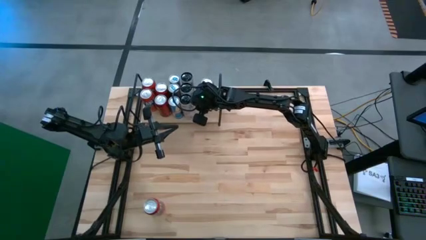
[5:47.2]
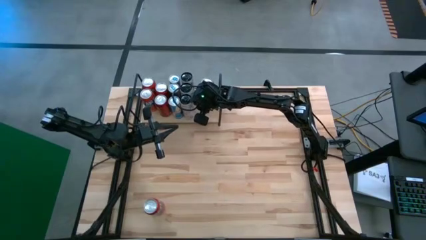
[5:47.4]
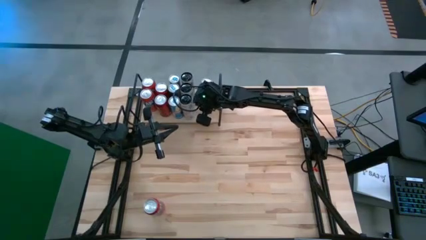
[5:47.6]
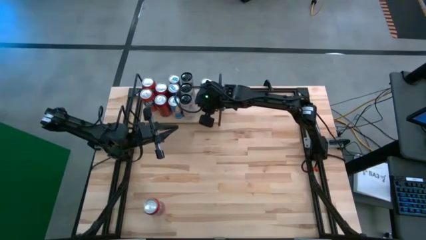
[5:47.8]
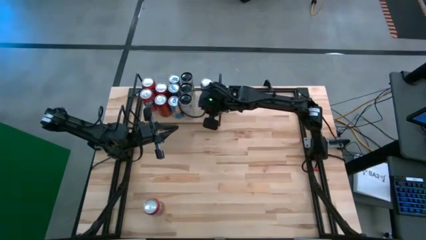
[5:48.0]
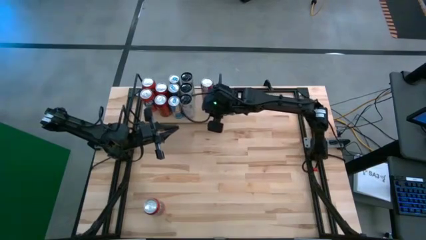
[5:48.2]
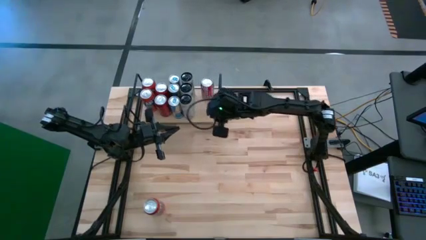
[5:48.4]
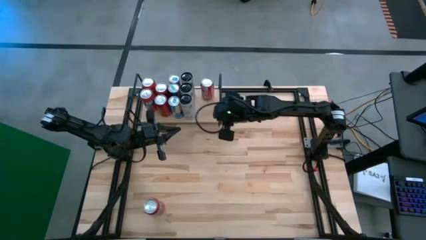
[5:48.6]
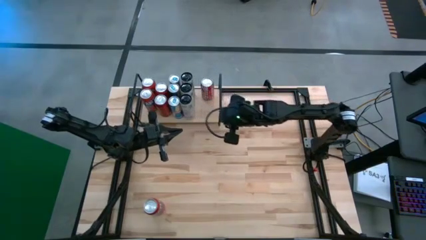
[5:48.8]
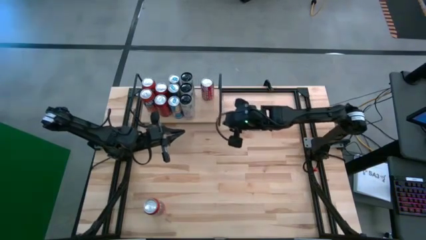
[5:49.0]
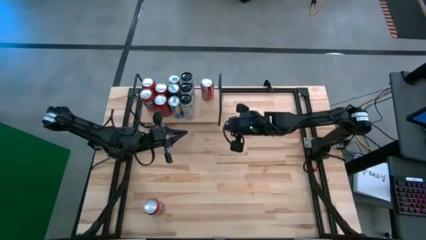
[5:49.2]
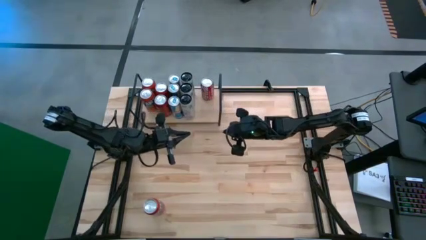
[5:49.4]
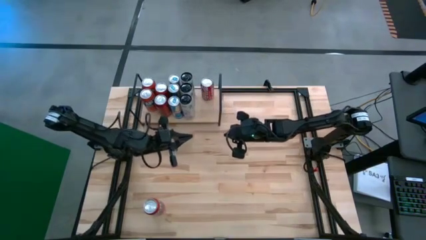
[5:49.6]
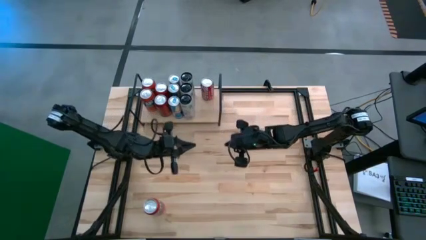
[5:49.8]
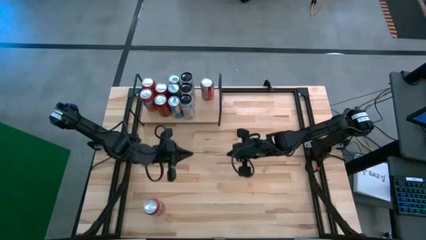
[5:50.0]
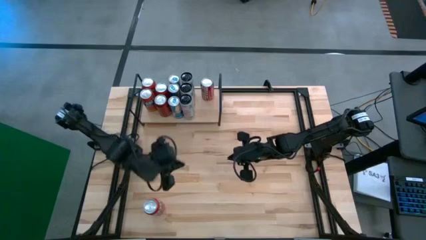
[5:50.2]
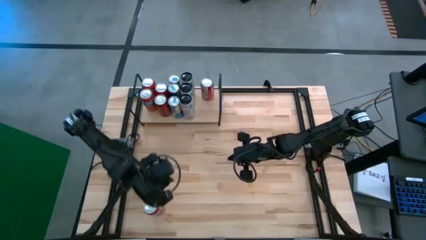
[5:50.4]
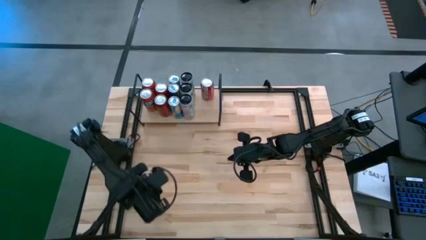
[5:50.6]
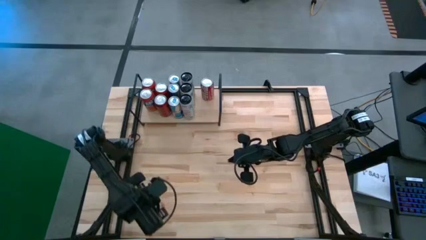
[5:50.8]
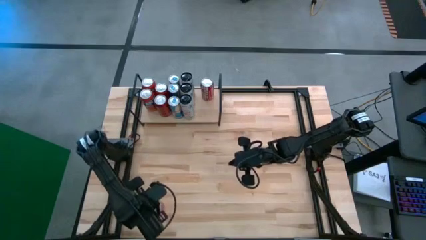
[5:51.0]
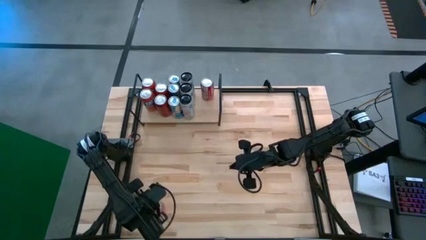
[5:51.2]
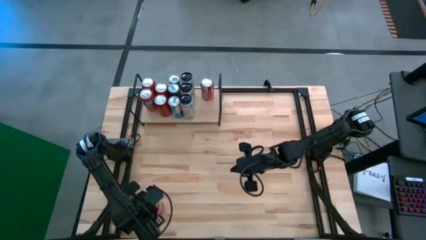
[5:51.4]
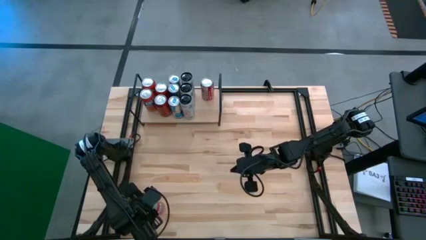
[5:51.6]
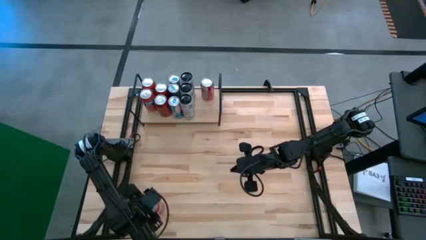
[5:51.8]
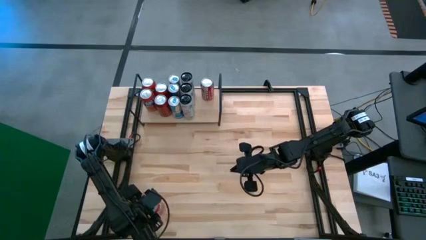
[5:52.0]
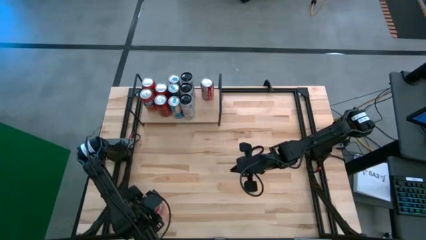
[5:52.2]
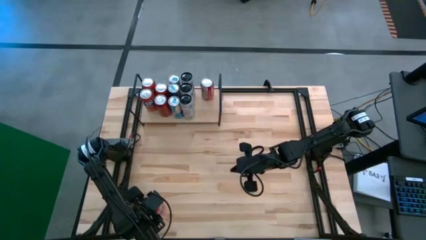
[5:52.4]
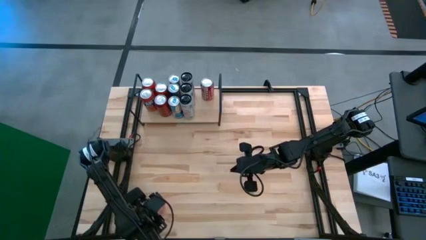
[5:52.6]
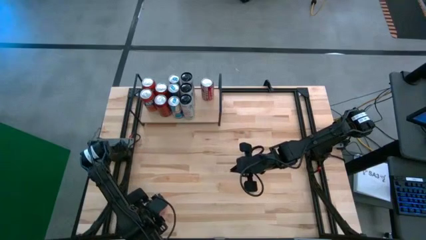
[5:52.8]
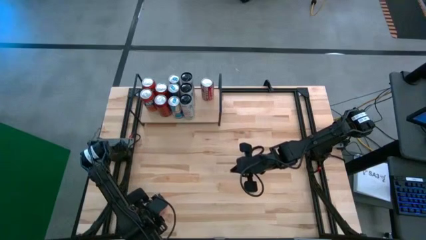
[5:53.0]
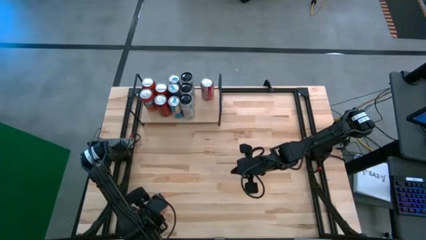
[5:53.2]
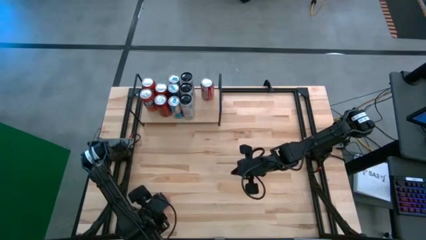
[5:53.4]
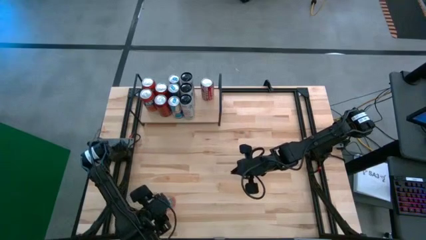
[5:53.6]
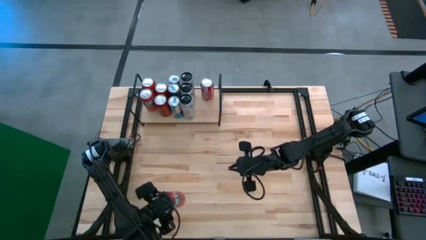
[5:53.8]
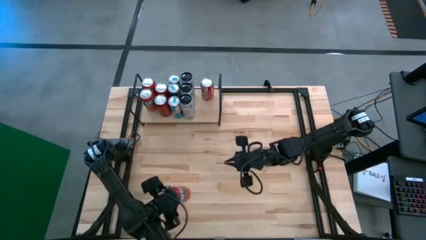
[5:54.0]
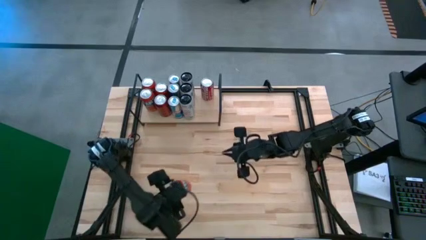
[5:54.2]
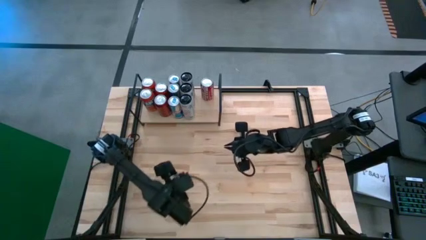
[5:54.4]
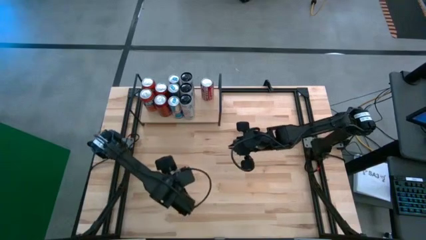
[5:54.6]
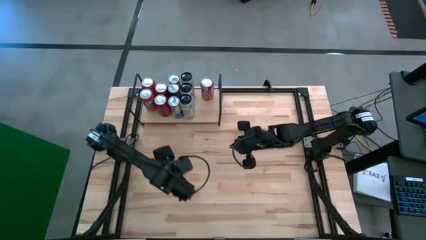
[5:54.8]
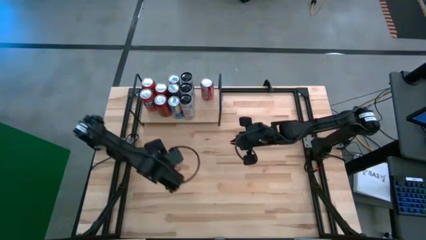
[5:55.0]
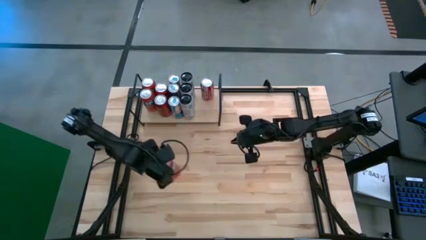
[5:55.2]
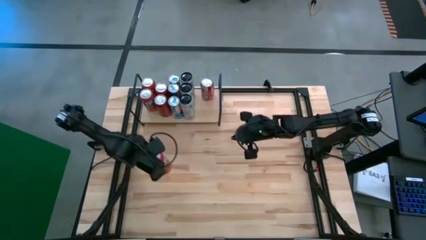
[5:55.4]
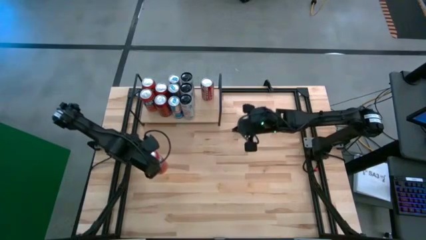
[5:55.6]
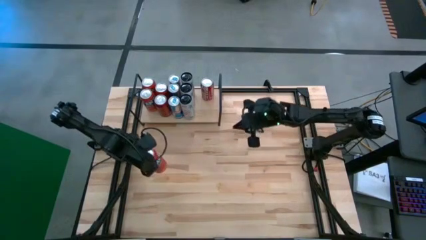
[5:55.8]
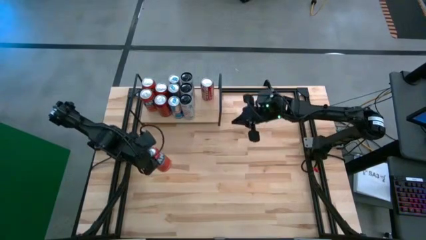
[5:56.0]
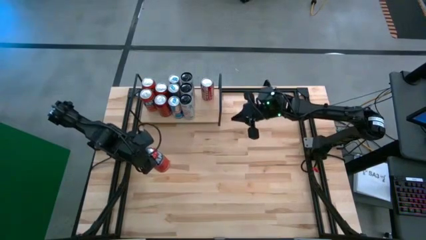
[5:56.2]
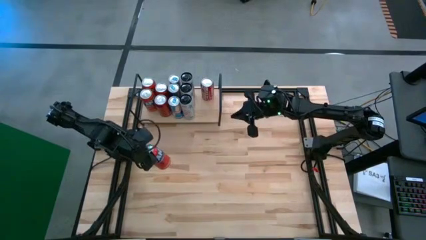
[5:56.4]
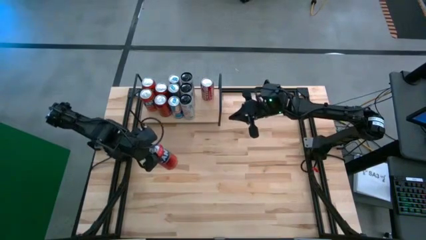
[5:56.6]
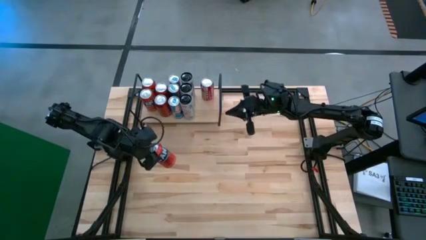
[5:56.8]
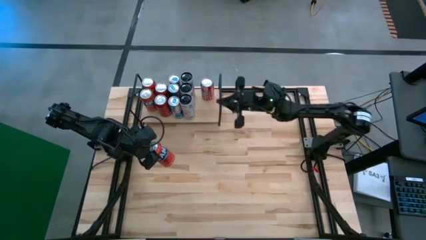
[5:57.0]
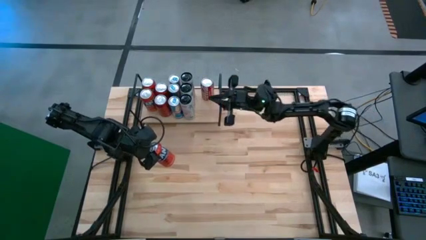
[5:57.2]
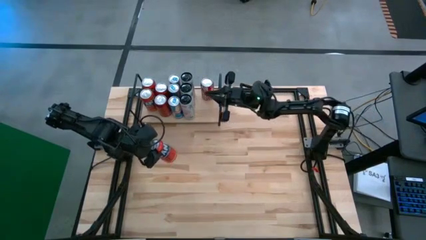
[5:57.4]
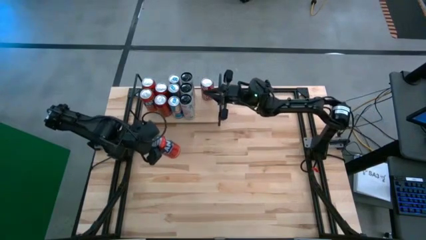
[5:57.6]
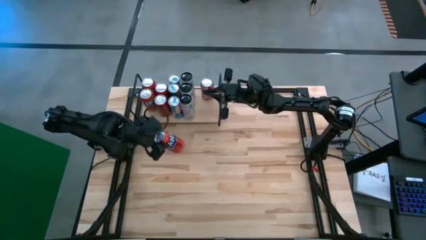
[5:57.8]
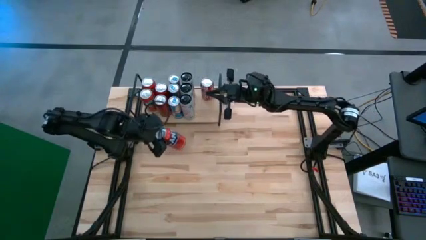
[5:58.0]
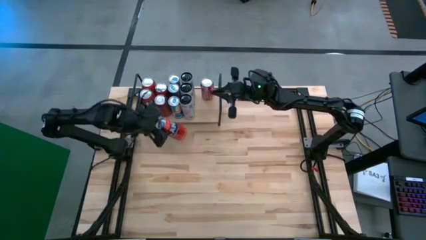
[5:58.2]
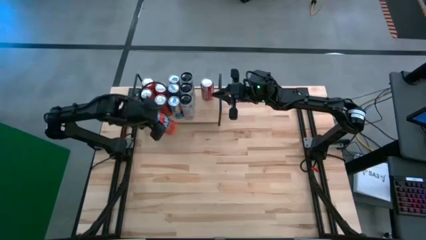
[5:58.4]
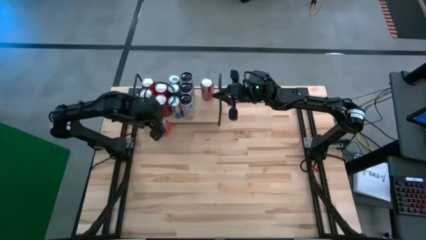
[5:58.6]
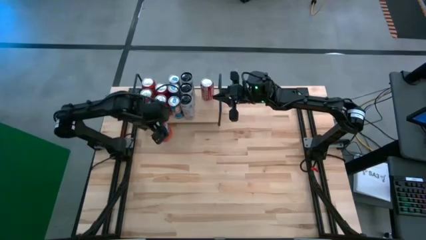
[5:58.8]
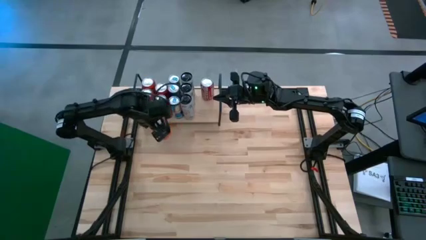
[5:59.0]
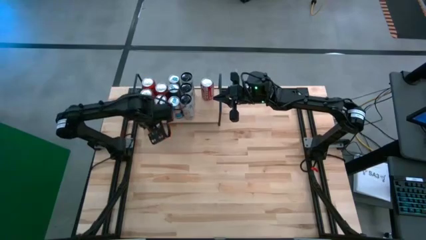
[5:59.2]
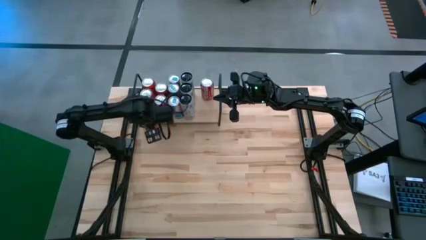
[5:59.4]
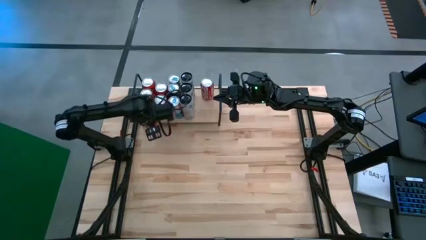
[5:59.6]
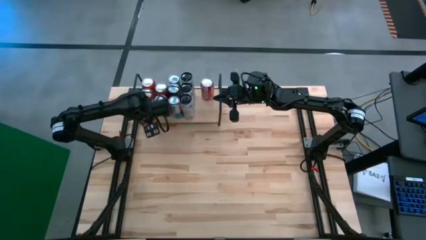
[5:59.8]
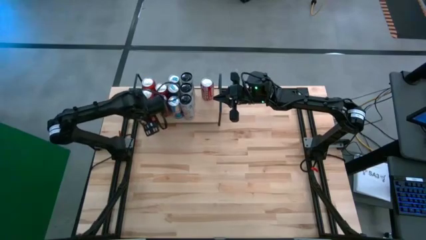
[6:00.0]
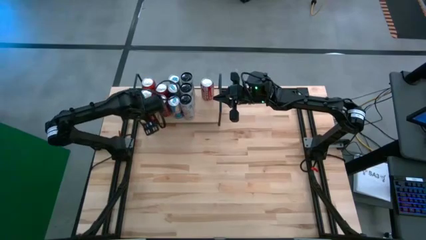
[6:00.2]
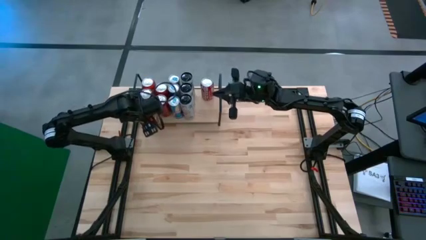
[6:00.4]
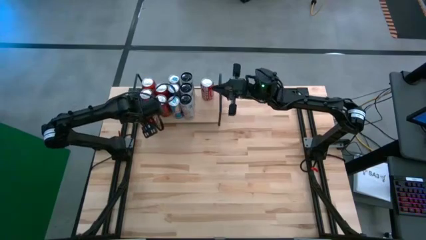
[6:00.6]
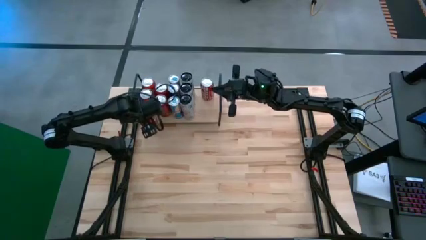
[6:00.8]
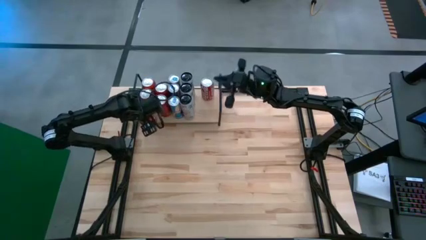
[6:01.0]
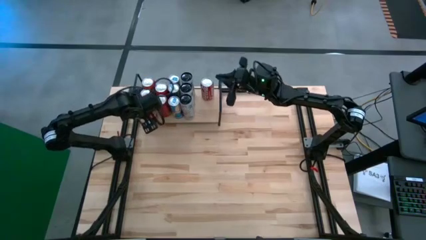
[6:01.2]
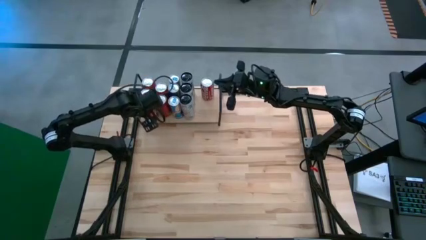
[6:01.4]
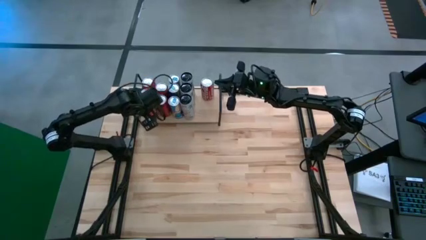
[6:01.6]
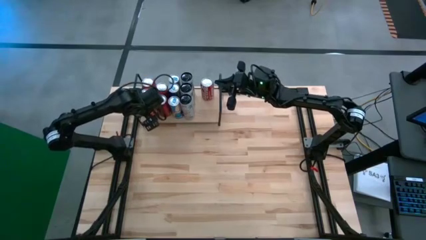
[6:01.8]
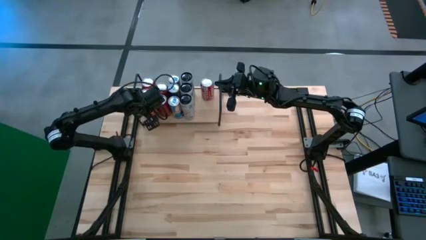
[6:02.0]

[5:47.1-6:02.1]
Task: Place canned beverage on shelf
Put the orange soda can on the shelf aligned with the other orange soda cans

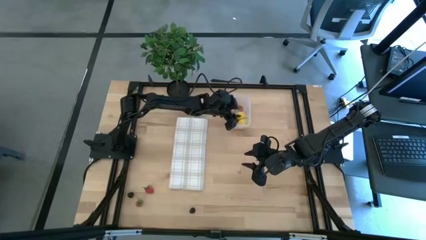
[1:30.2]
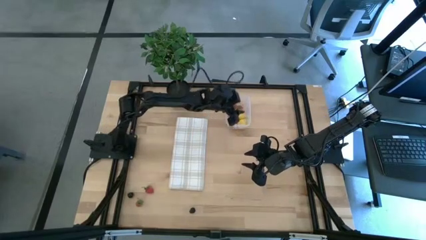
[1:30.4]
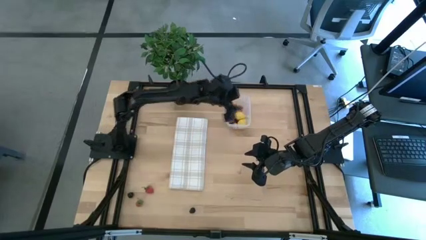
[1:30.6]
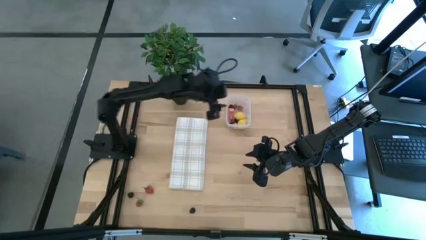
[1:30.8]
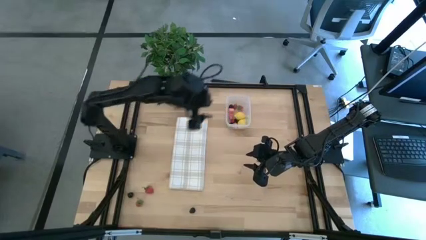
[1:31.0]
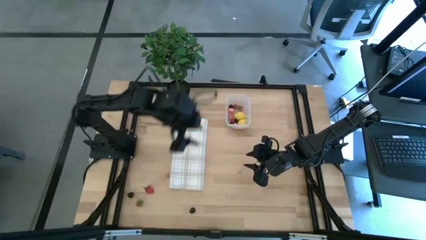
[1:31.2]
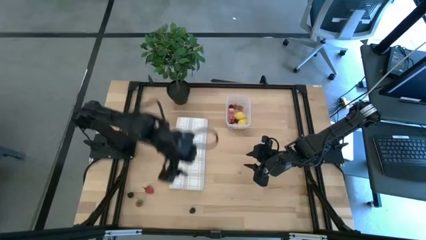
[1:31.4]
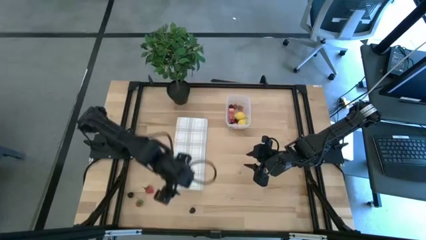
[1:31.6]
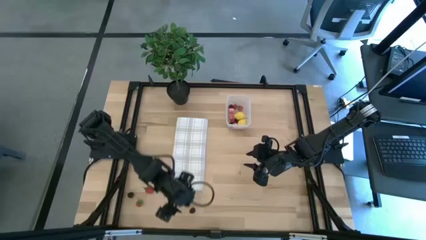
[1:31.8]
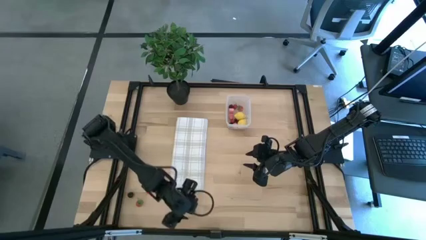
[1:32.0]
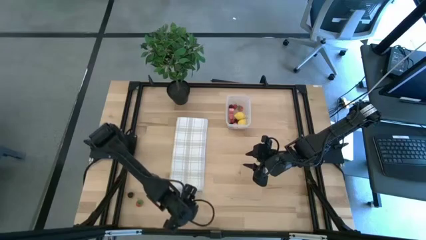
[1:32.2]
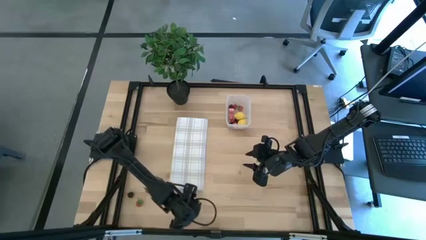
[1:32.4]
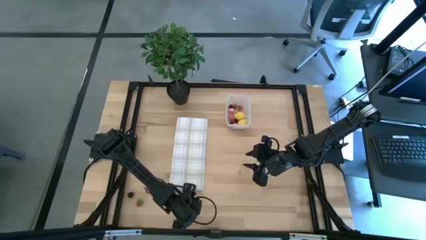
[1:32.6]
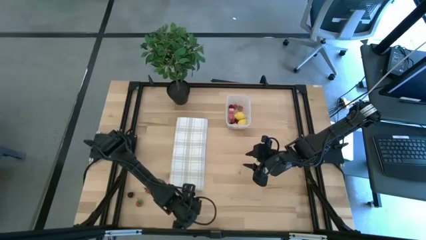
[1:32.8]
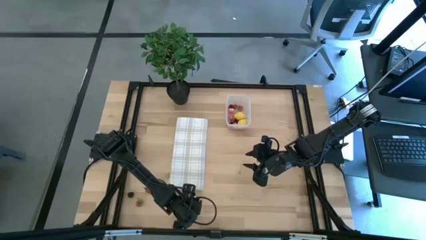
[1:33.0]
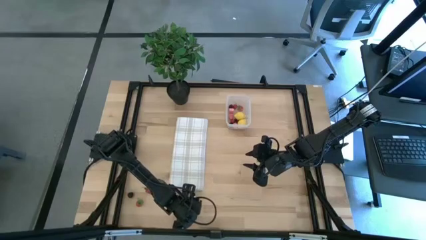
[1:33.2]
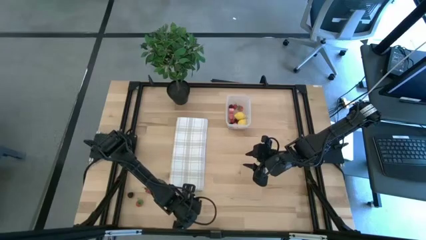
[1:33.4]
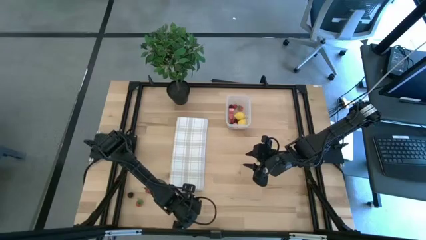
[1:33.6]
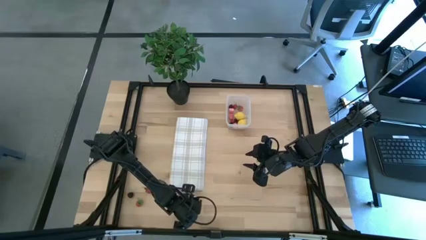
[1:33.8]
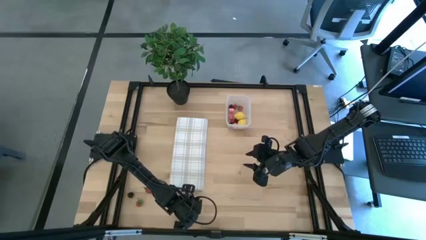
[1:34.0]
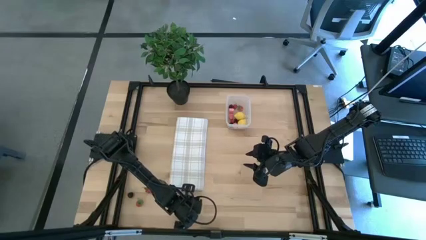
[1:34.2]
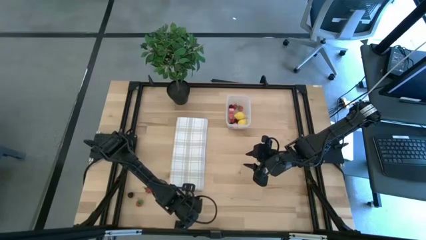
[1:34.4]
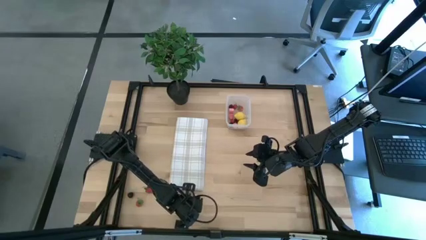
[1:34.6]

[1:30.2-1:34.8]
Task: Pick and placing Produce into tupperware
Put the blackberry into the transparent bin
